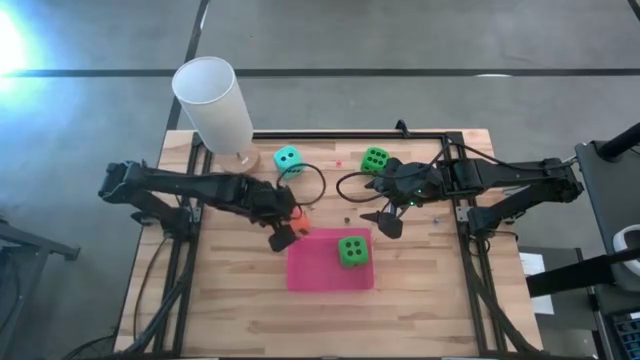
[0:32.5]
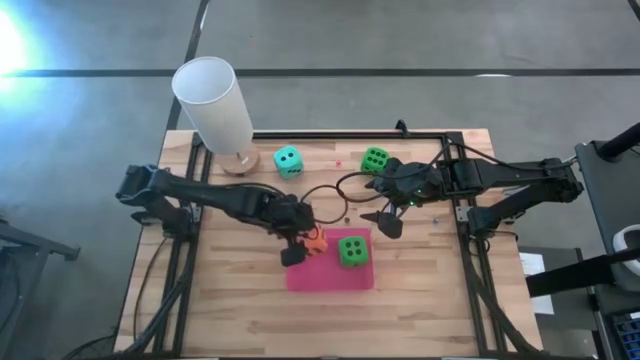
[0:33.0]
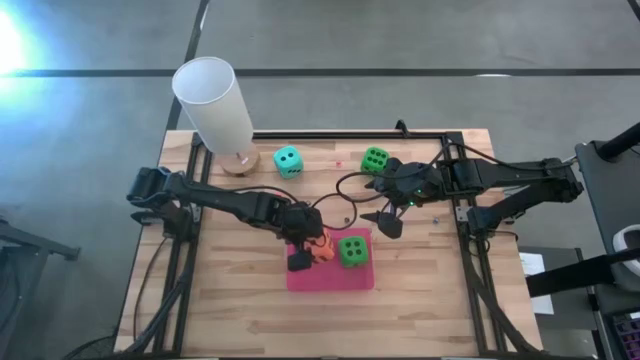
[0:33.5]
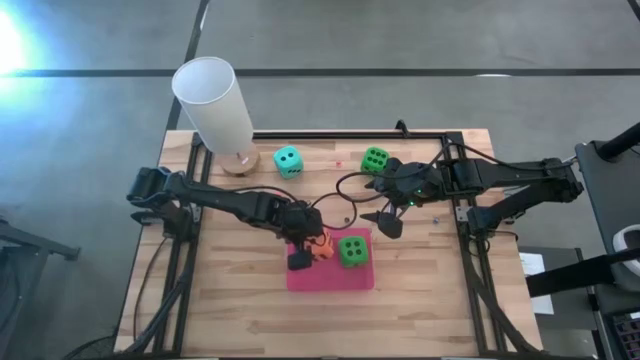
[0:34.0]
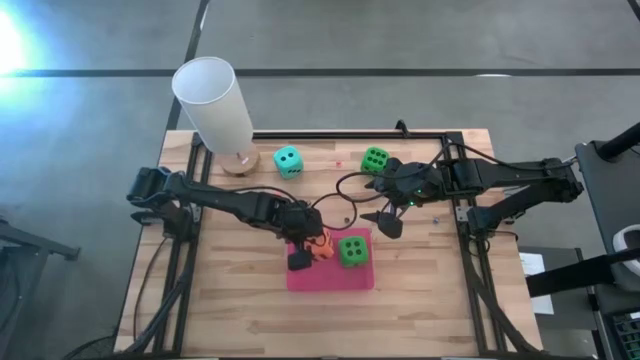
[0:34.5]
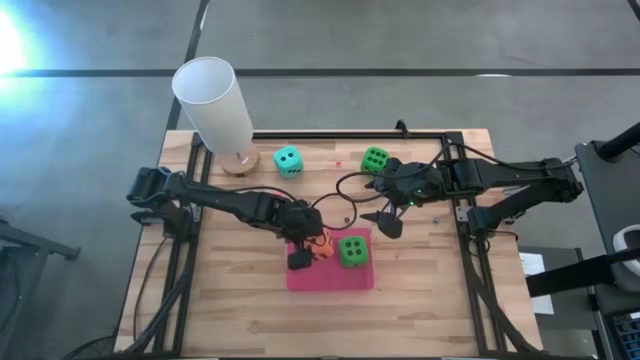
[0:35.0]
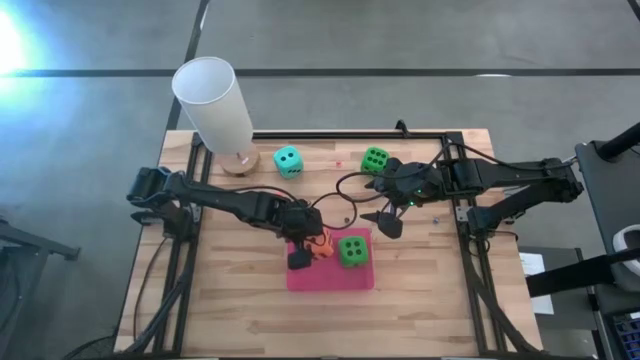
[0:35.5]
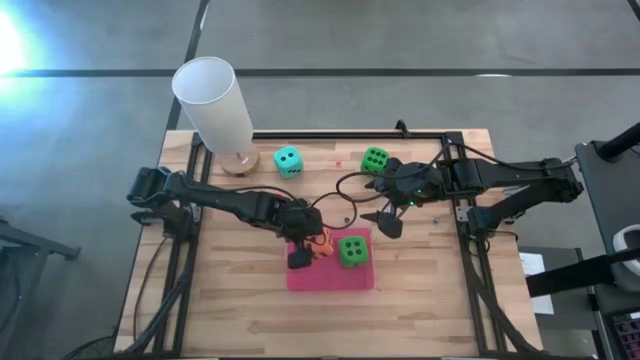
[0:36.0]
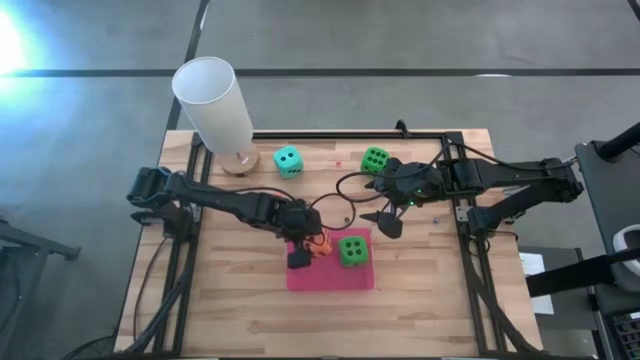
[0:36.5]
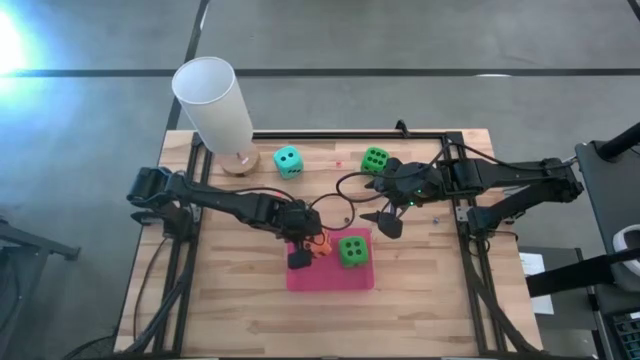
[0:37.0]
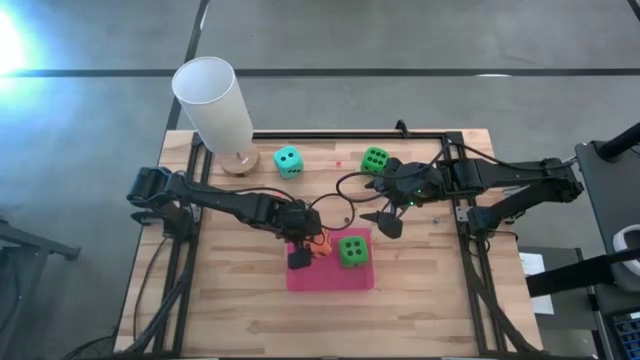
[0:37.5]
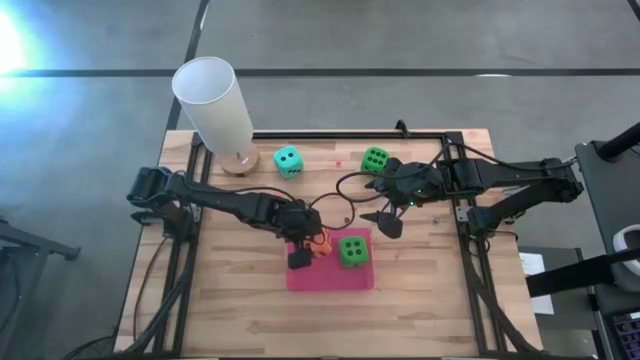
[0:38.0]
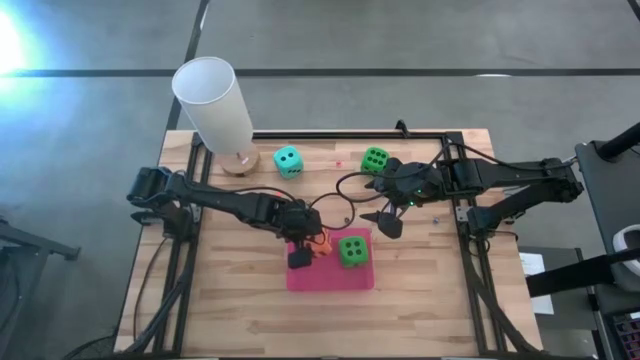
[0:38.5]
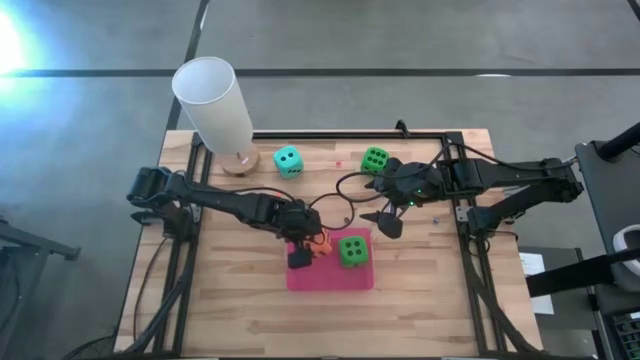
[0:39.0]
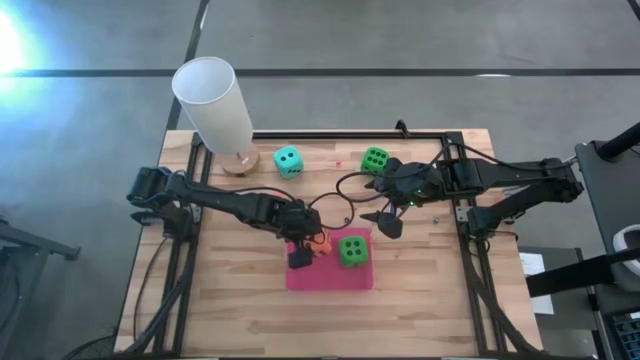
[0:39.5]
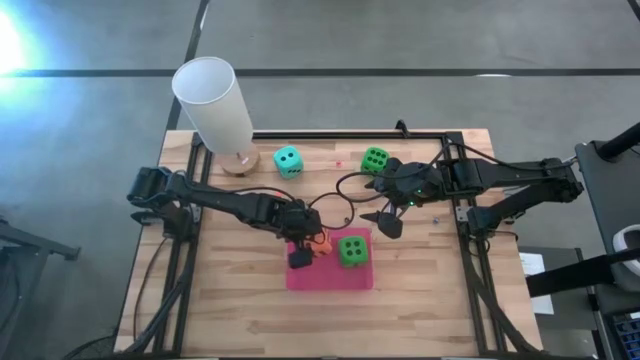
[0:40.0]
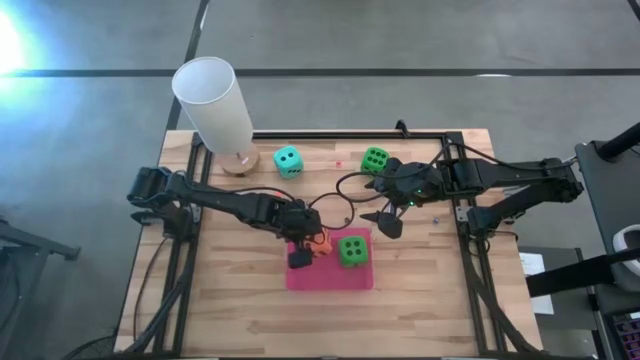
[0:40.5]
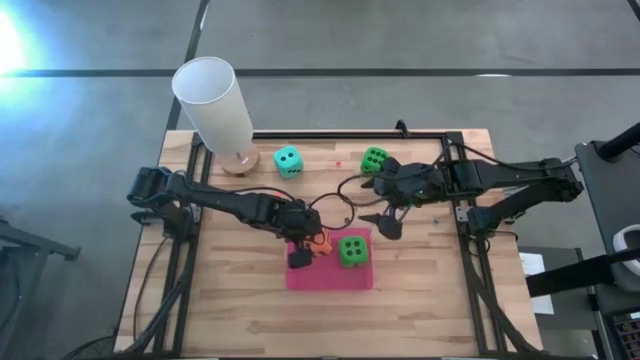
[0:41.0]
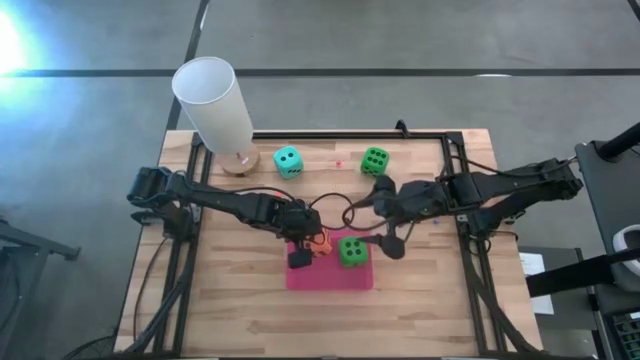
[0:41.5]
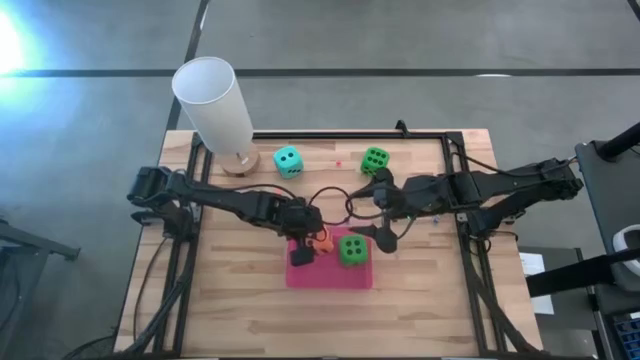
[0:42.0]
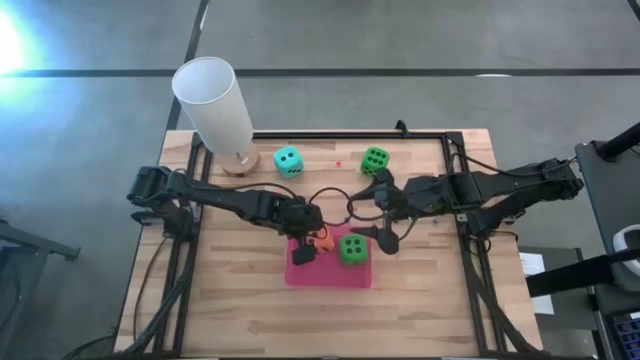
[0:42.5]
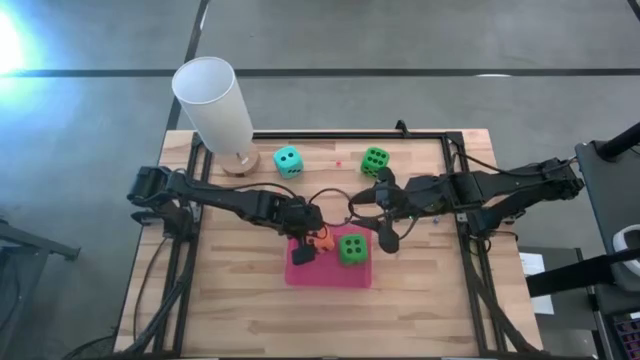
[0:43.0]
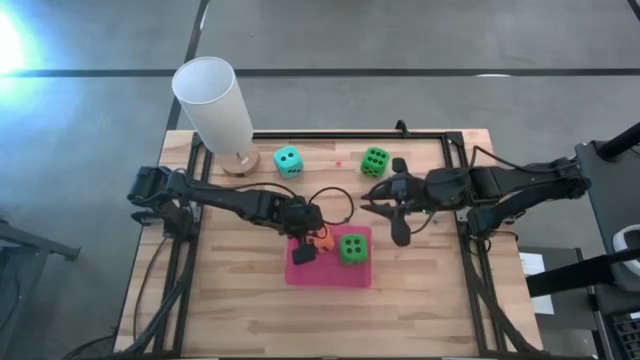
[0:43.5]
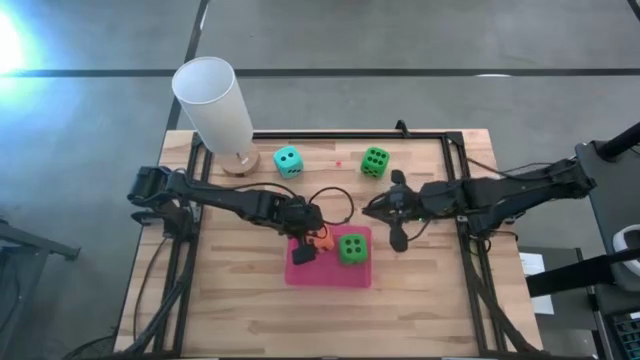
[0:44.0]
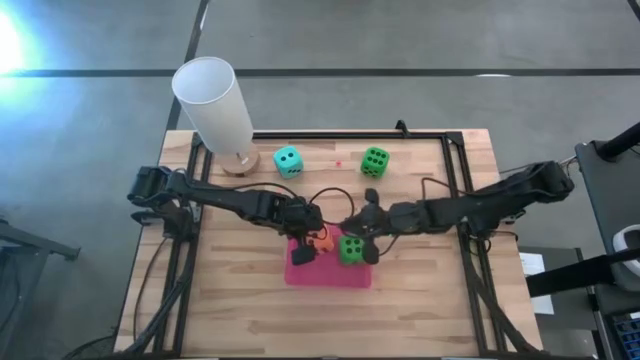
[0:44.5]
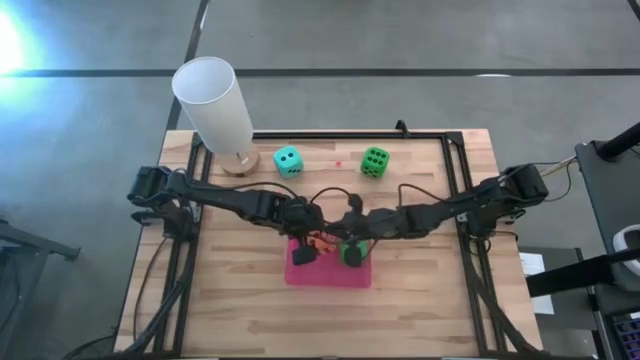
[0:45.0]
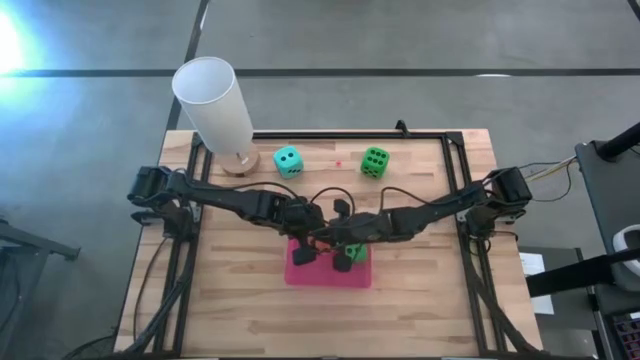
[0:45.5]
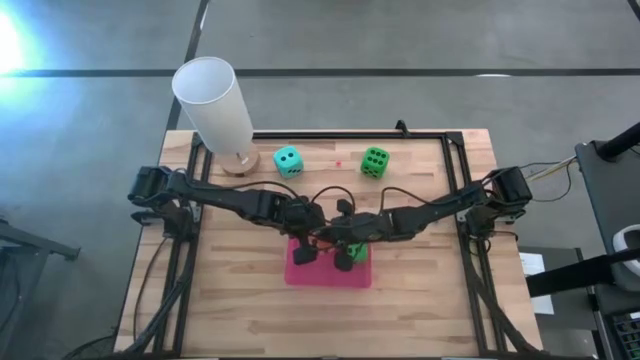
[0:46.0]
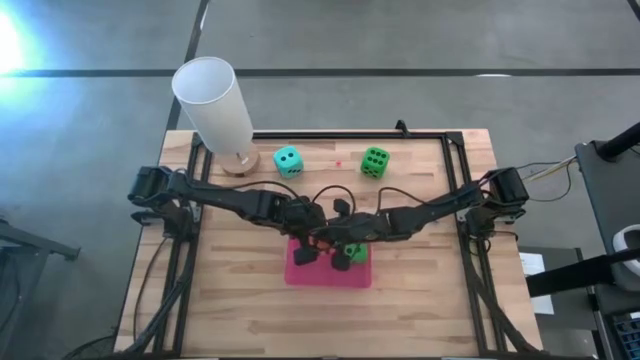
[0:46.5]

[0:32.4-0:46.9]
Task: Pick & Place Dice
Put the large orange dice into the pink bin

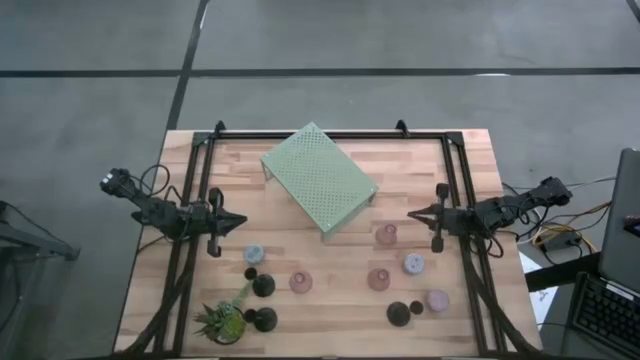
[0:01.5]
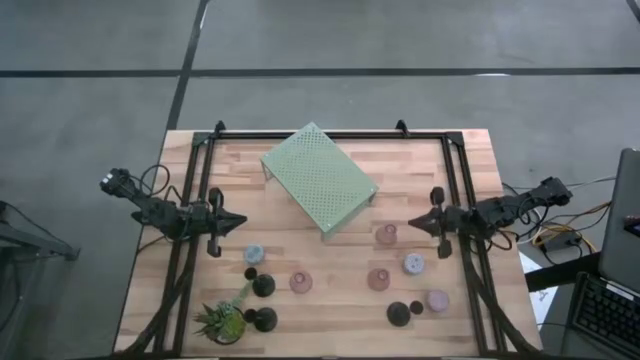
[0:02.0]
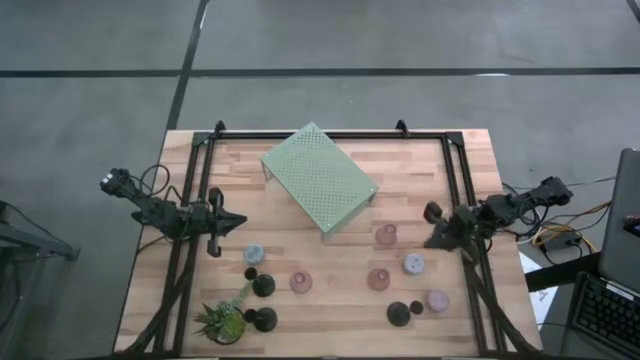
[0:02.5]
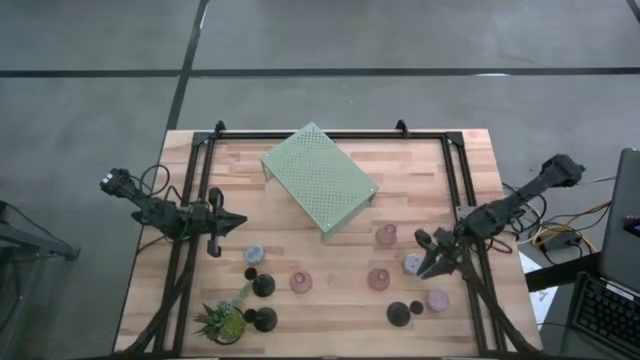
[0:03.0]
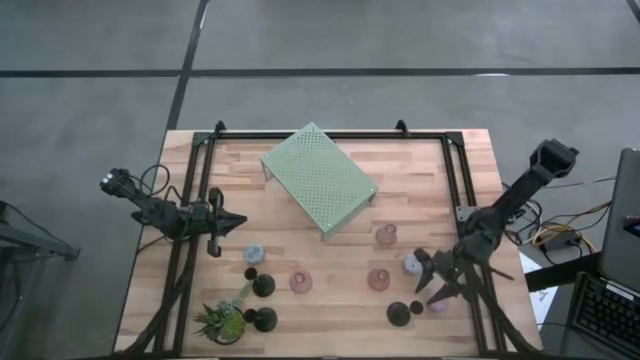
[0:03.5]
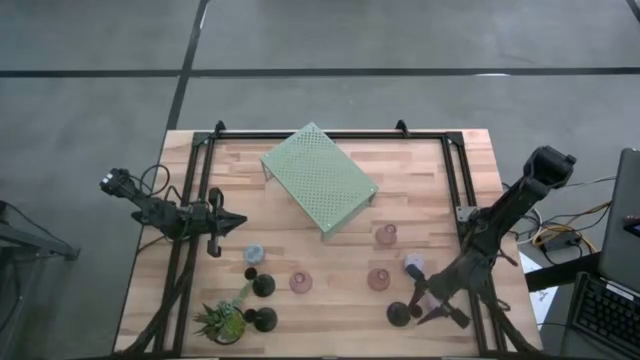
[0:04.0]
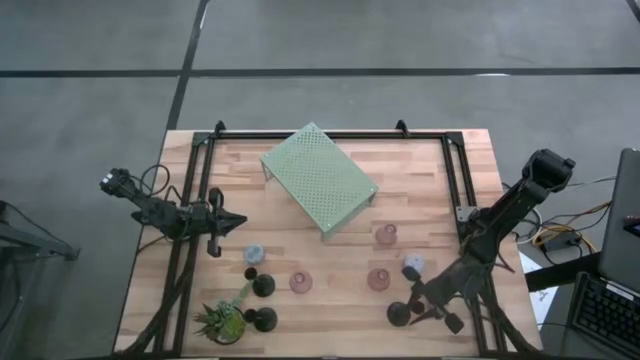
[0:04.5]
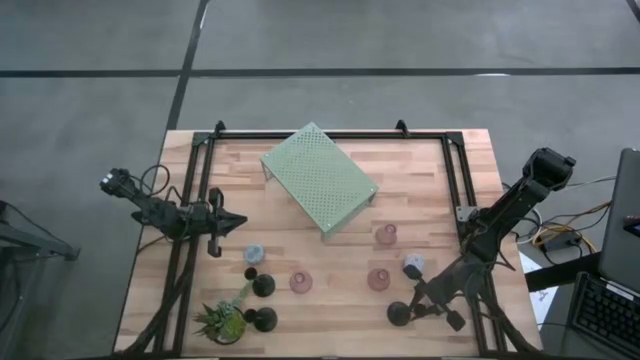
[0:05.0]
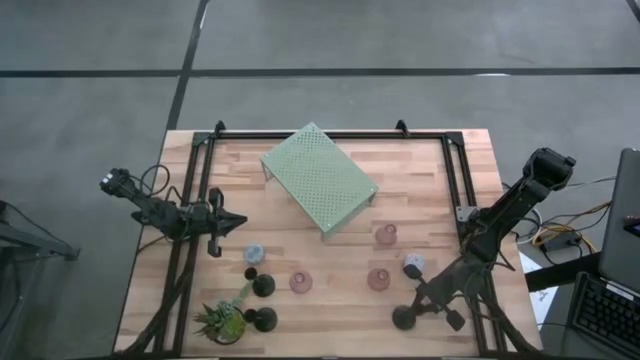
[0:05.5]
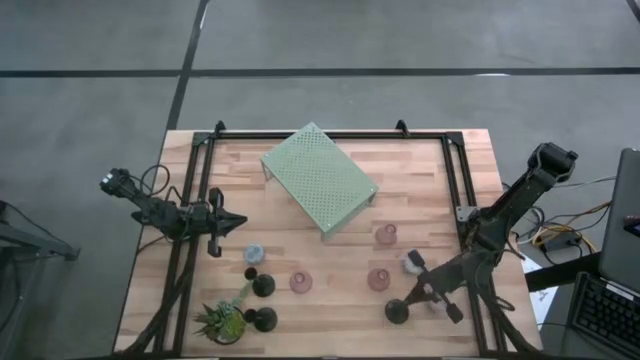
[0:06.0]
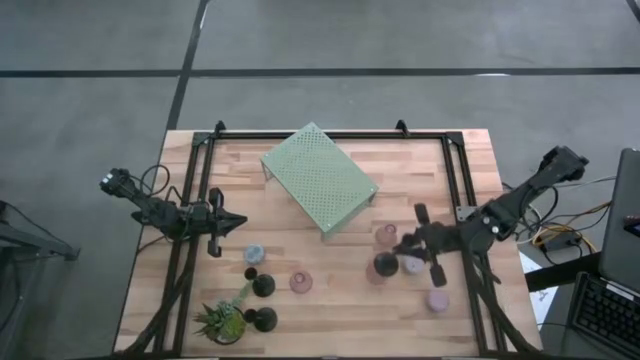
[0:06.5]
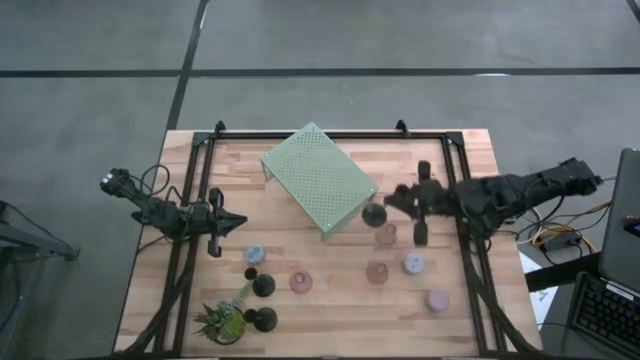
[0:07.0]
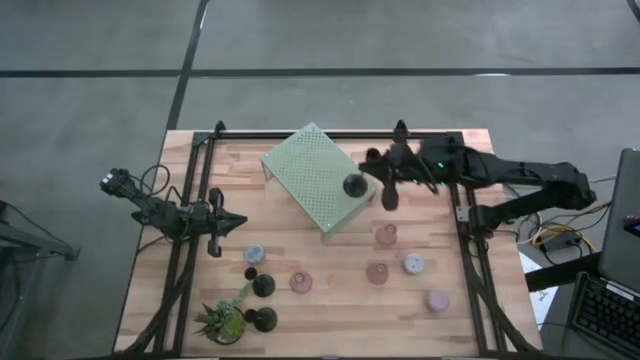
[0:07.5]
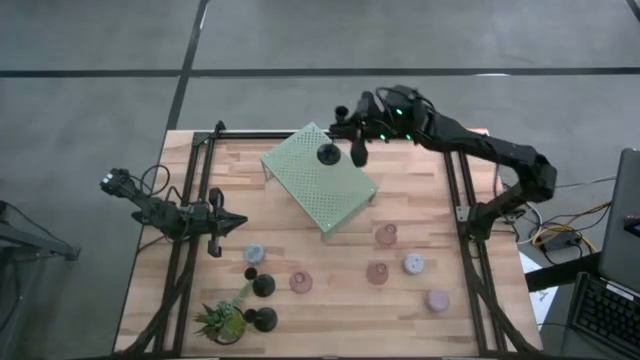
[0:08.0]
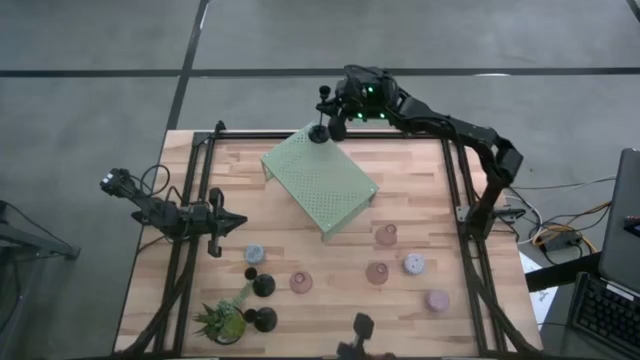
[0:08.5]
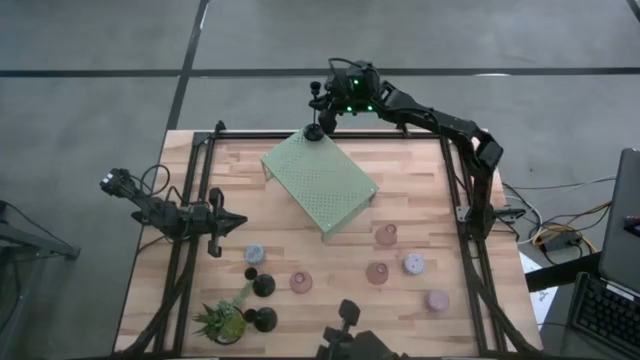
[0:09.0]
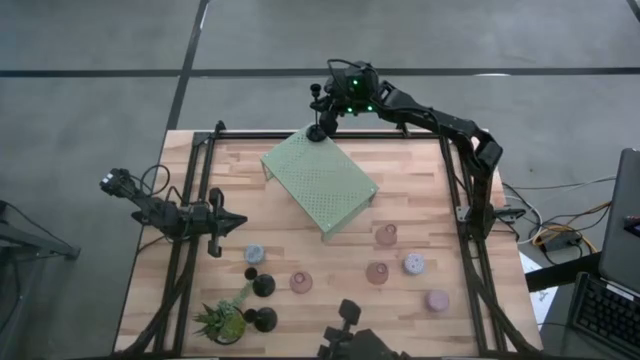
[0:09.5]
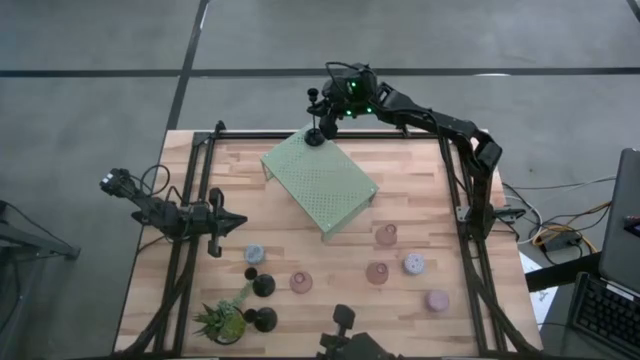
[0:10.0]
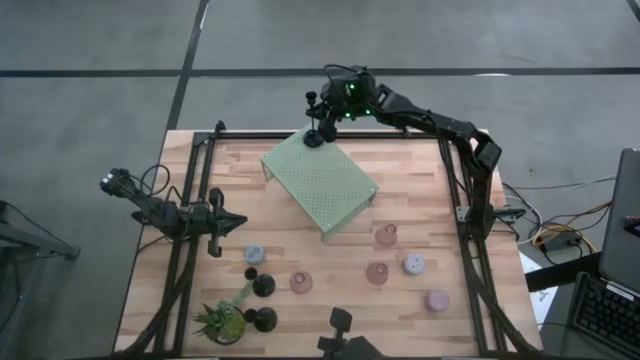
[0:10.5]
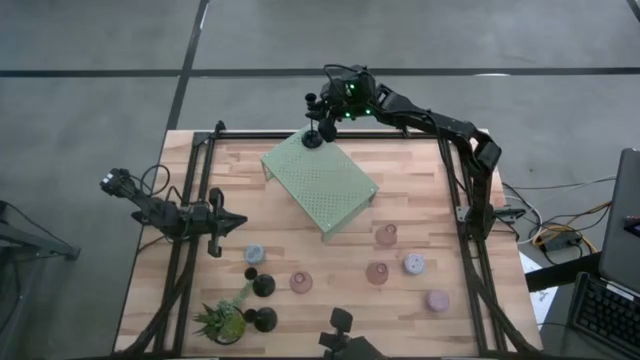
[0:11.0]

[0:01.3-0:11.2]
Task: Pick & Place candle stick holders
Put the right black candle holder on the shelf
